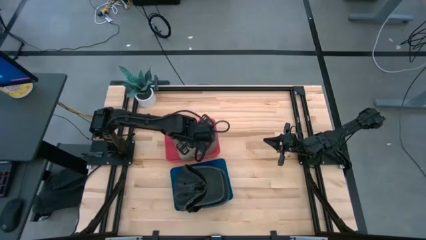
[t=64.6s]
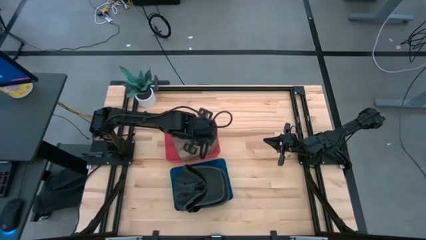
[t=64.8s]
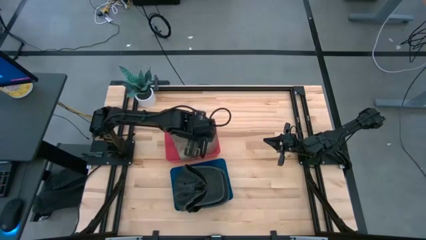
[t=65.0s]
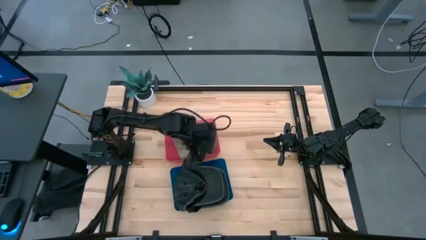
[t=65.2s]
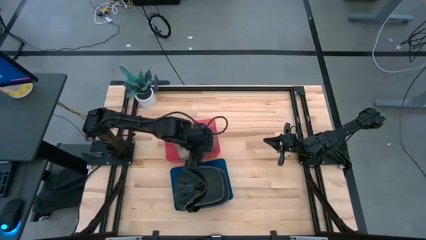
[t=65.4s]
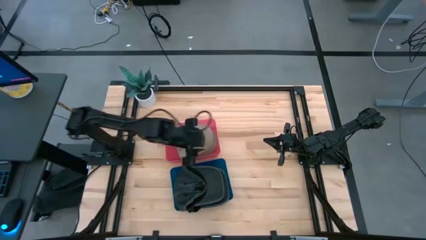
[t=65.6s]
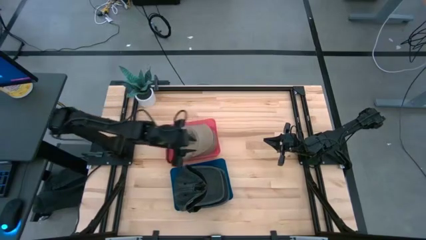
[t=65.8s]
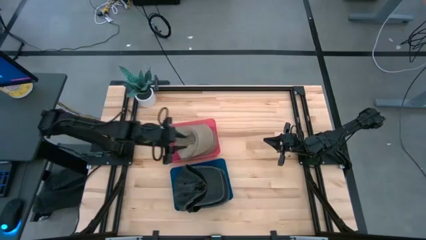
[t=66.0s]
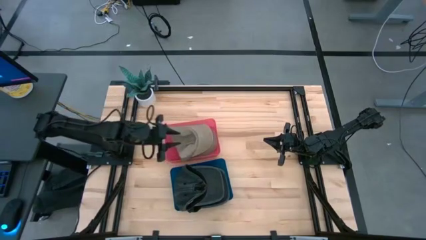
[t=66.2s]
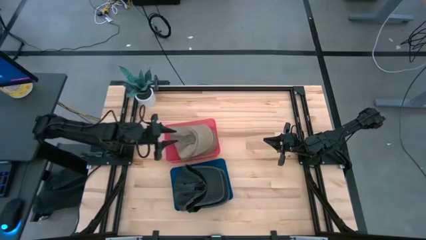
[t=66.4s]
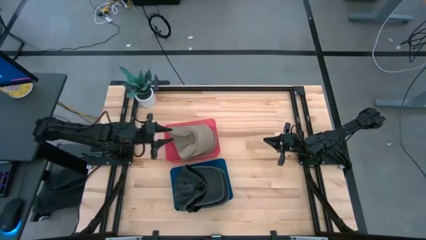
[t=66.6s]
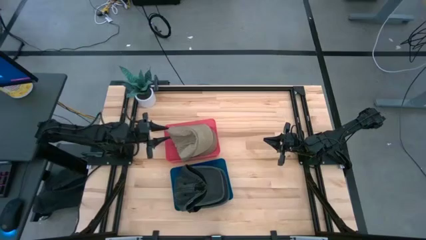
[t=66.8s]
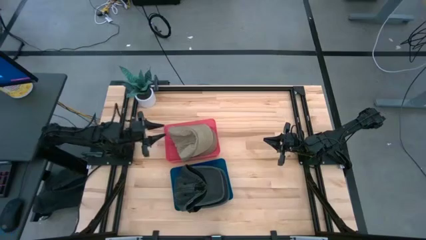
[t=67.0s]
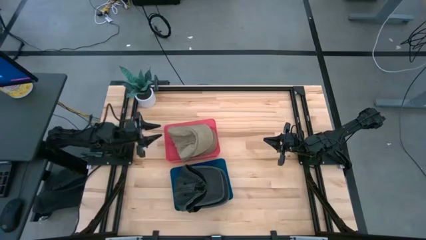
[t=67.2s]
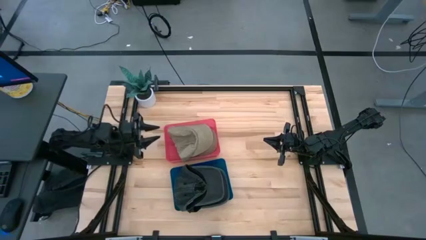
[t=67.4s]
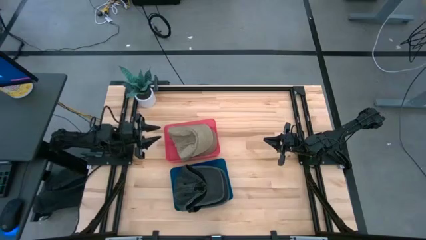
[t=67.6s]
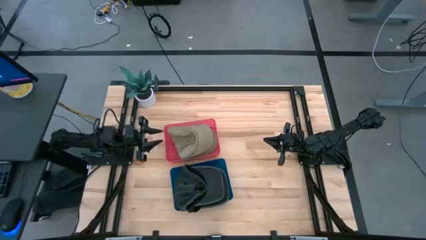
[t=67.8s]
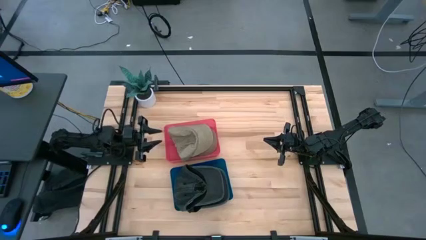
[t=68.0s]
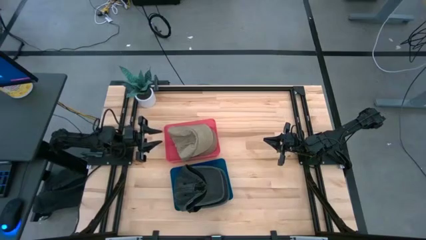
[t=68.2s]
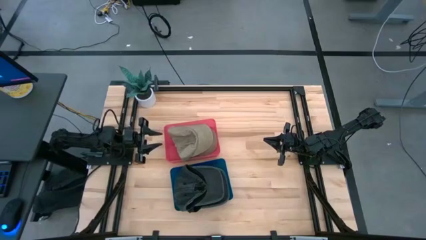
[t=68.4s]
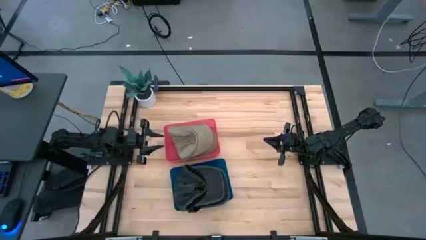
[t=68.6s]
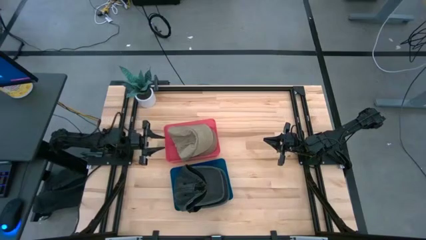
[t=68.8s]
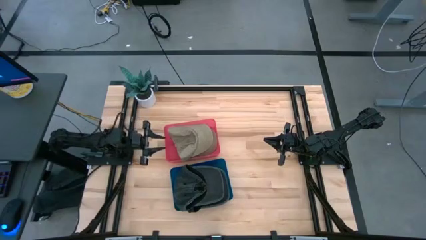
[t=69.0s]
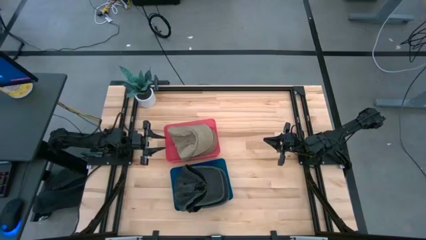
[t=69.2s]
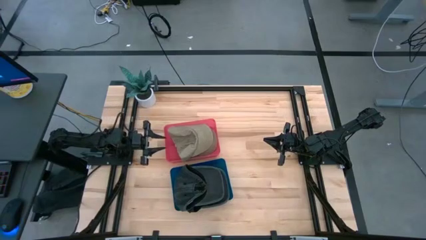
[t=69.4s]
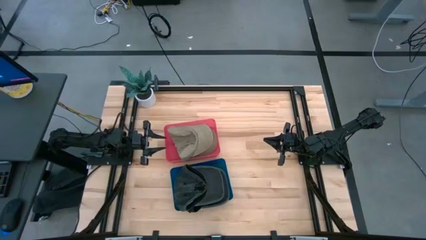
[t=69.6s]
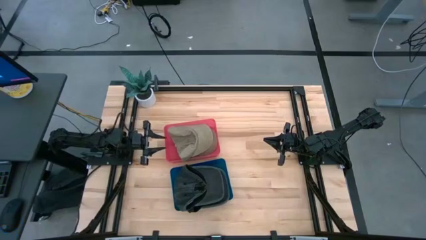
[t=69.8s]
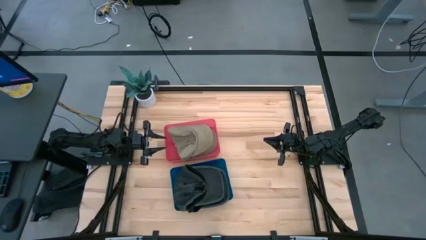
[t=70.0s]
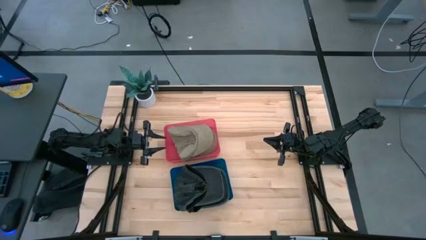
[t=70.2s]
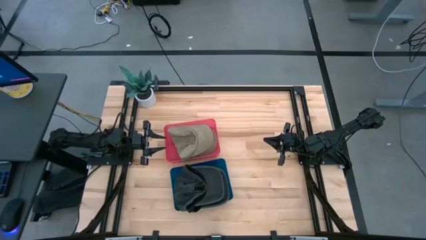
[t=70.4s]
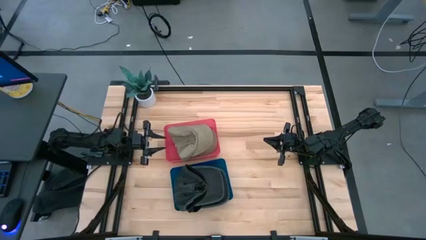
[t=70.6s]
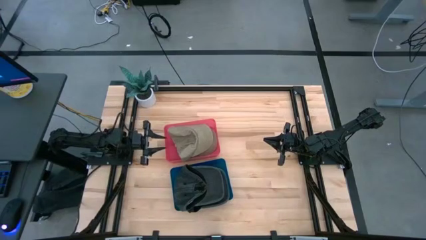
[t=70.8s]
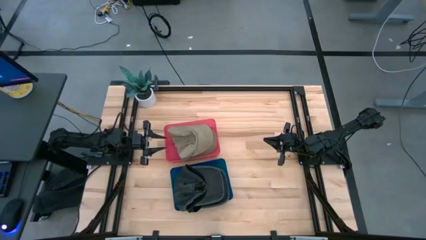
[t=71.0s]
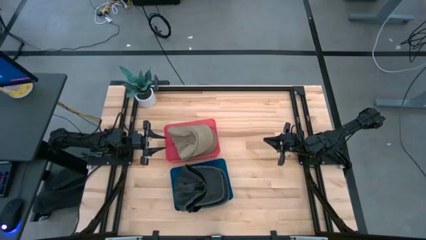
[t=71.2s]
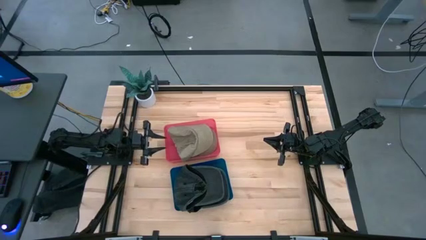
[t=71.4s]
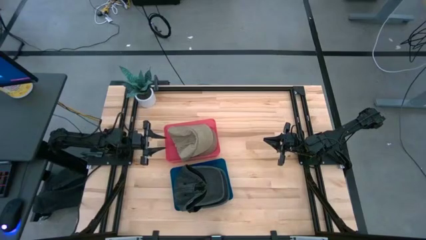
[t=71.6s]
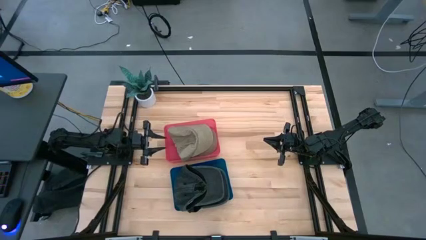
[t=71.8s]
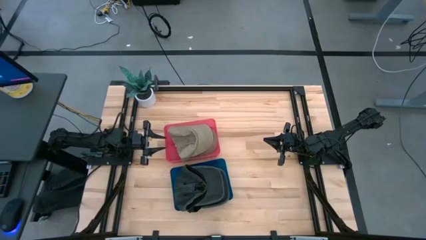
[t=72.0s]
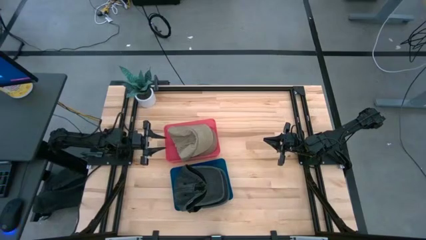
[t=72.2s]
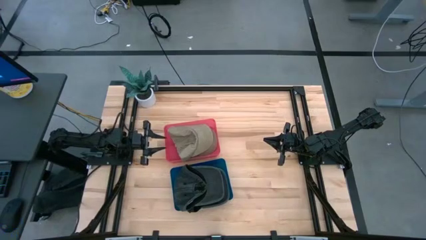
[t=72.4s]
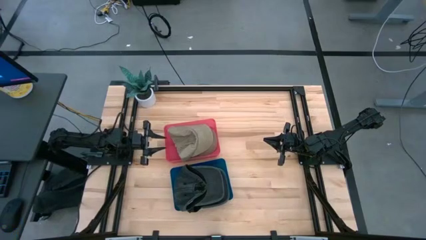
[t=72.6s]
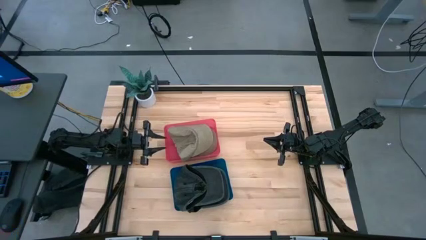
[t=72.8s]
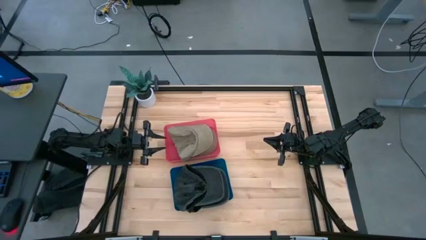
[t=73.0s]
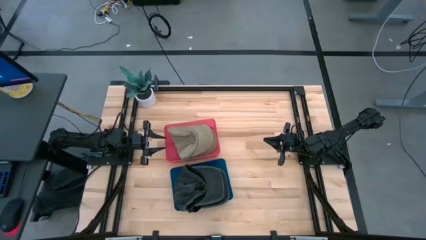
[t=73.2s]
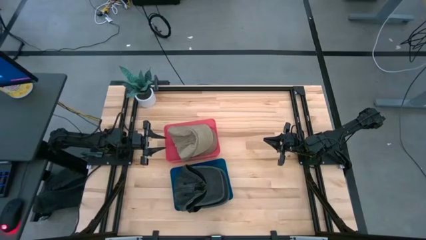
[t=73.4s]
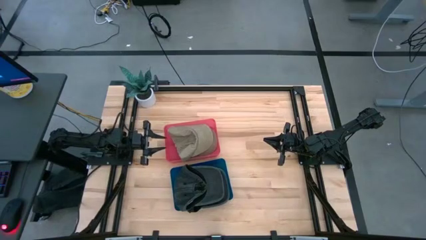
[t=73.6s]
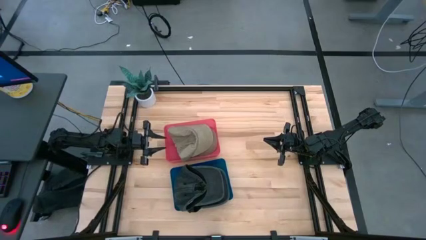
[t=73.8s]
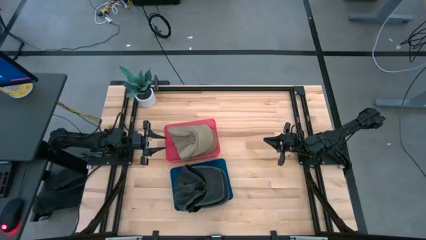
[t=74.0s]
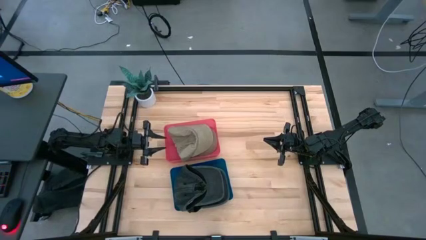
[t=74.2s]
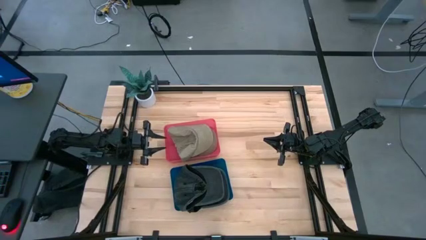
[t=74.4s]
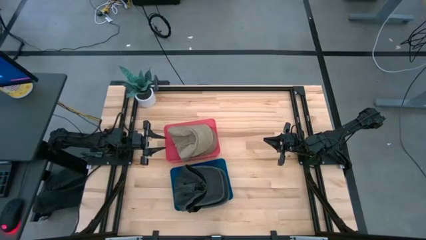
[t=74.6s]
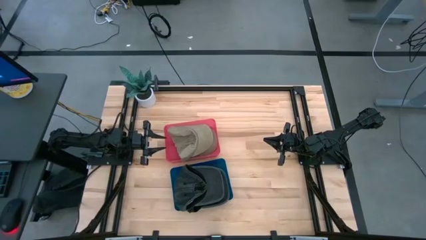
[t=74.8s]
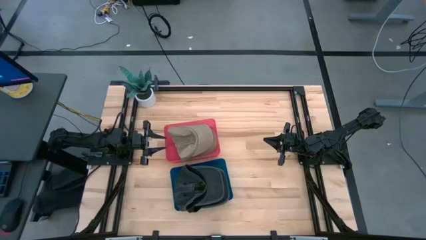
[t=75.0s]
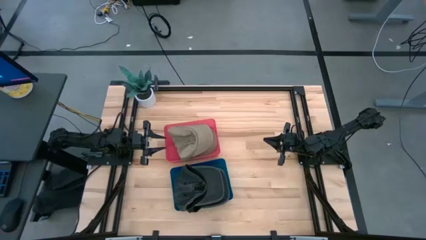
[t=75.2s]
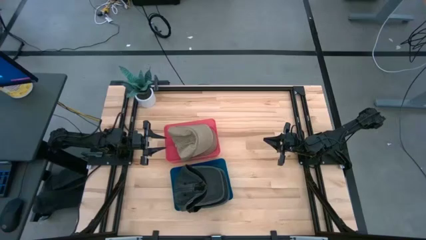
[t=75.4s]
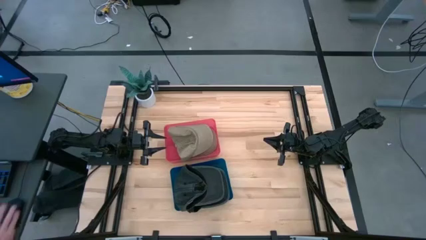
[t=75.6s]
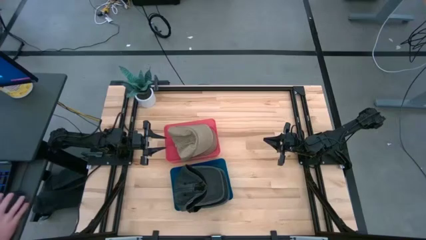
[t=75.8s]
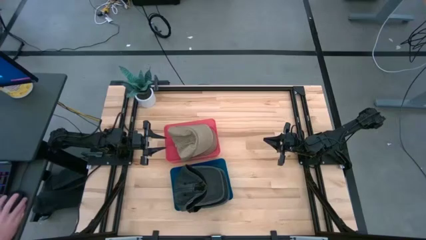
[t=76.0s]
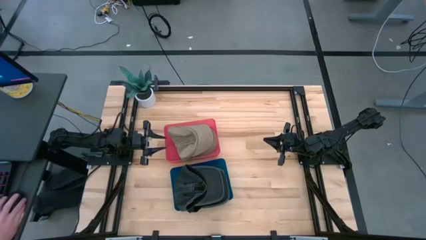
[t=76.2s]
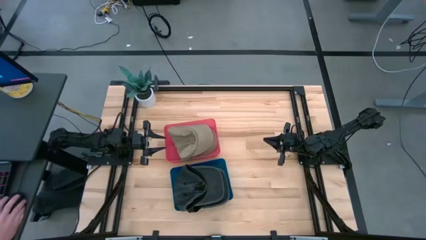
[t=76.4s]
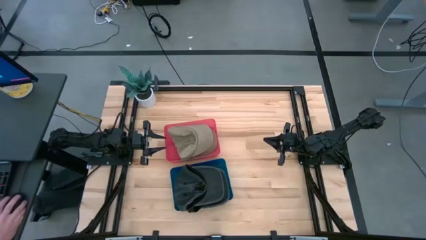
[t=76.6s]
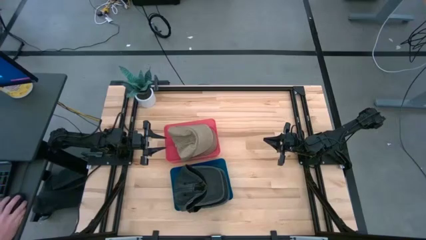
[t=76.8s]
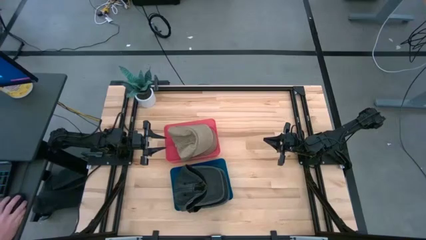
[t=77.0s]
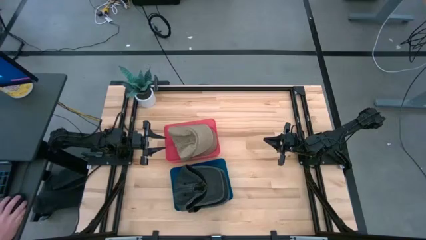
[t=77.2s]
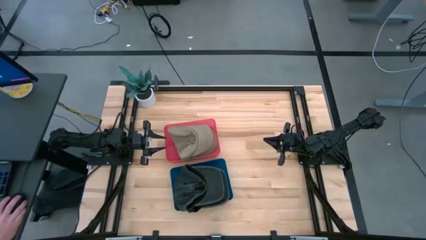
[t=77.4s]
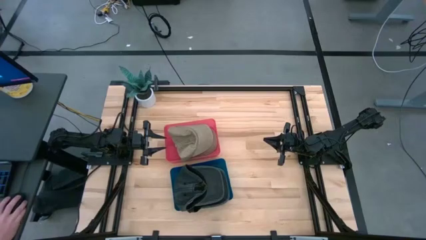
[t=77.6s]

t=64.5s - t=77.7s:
Task: Pick & Place hat
Return to Home Position
